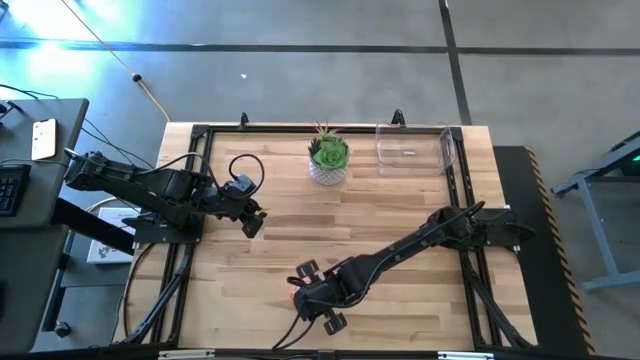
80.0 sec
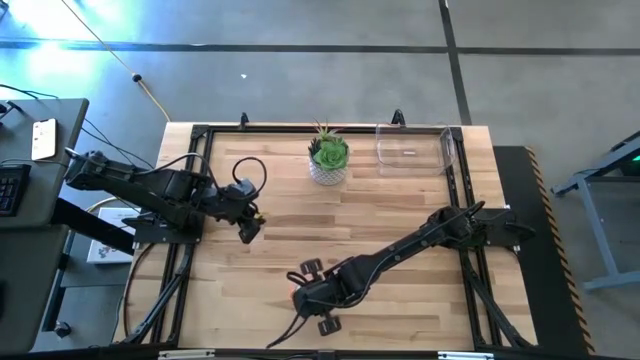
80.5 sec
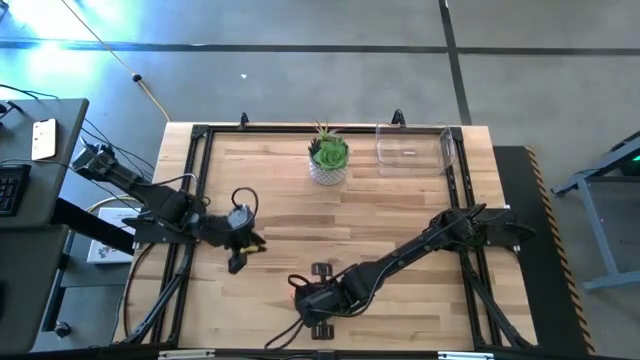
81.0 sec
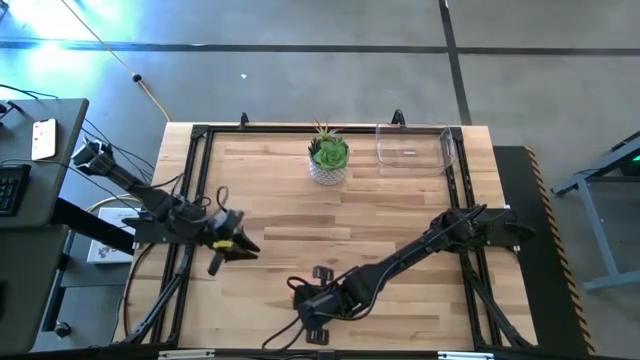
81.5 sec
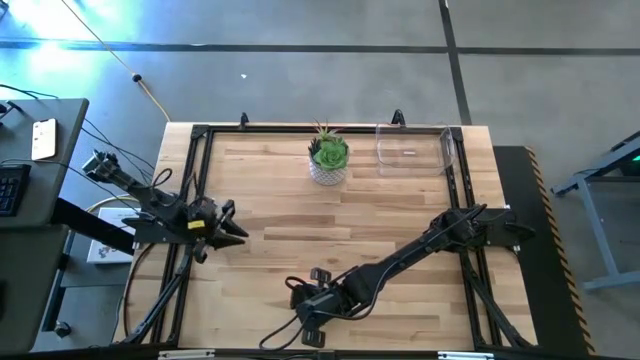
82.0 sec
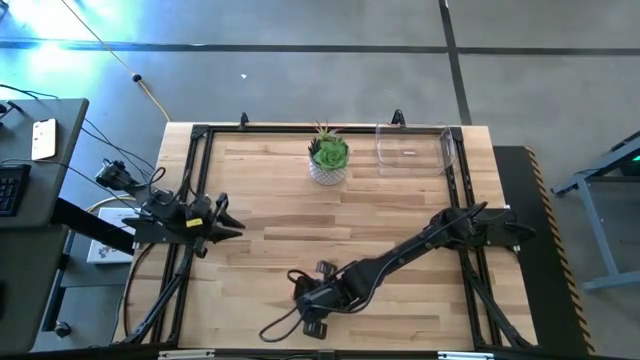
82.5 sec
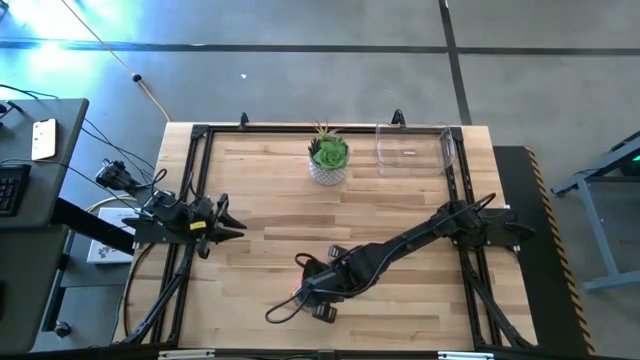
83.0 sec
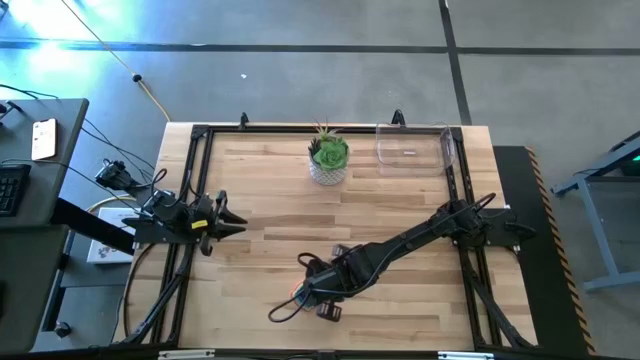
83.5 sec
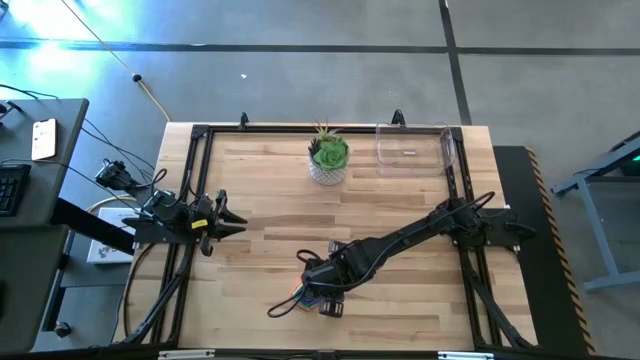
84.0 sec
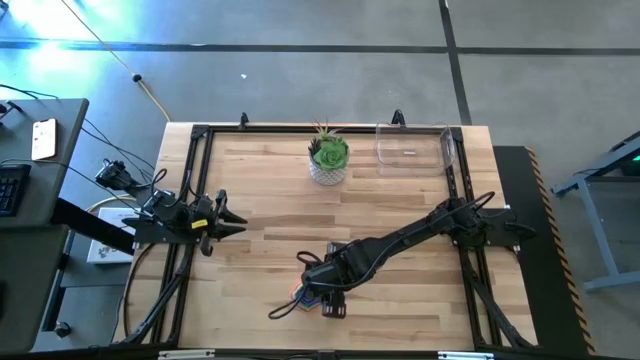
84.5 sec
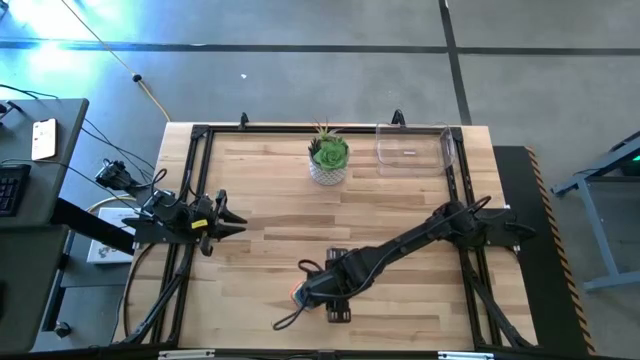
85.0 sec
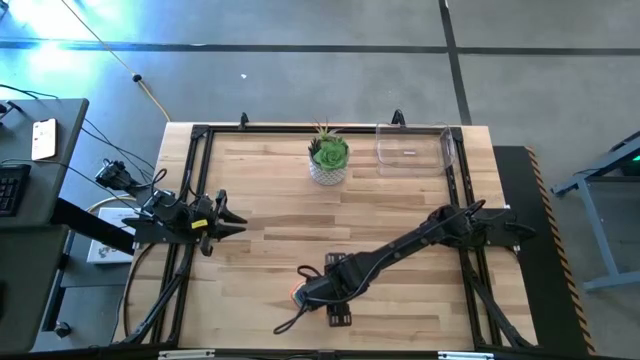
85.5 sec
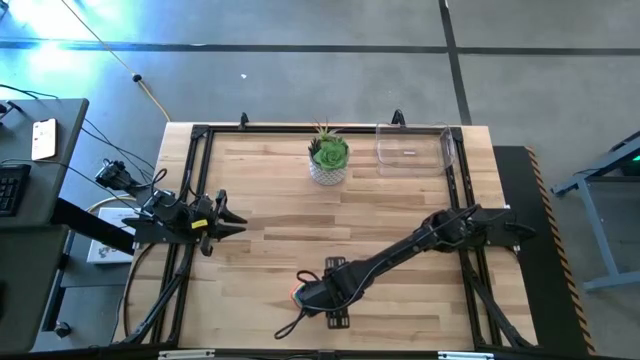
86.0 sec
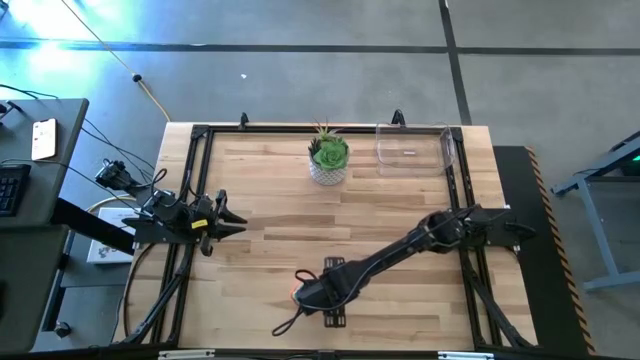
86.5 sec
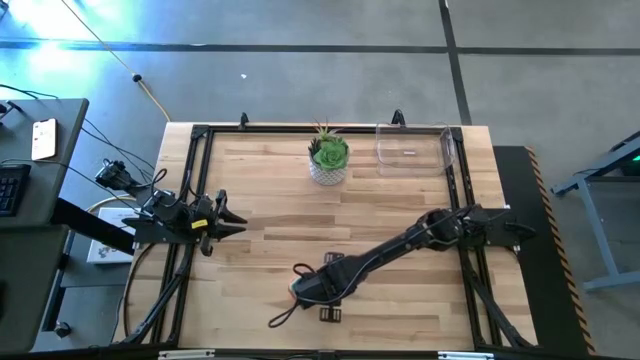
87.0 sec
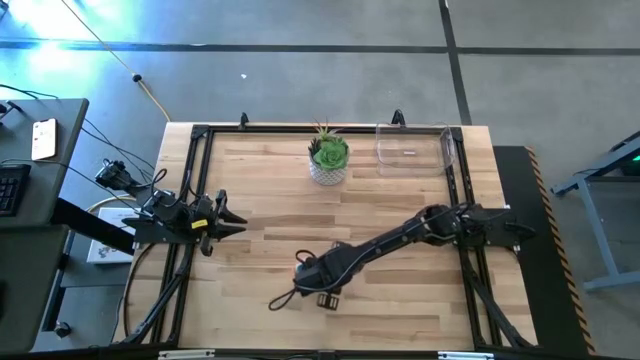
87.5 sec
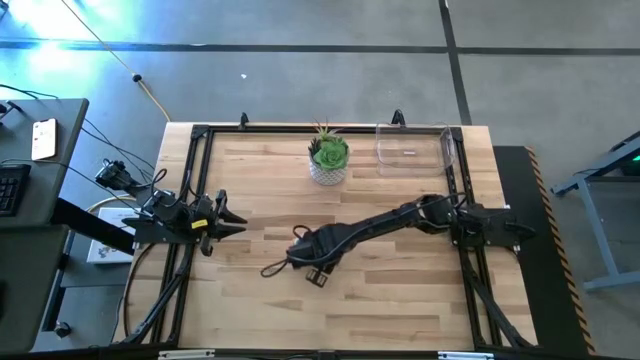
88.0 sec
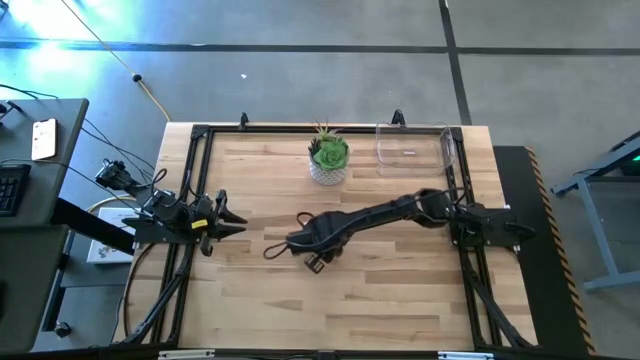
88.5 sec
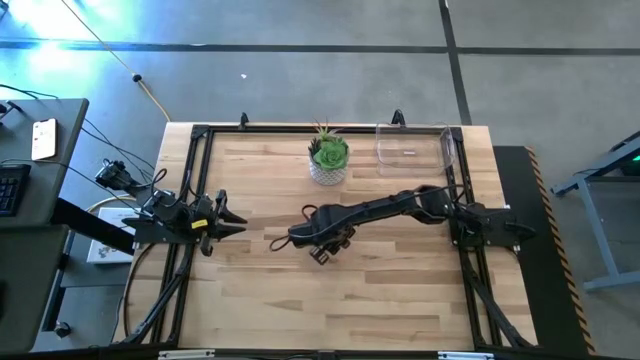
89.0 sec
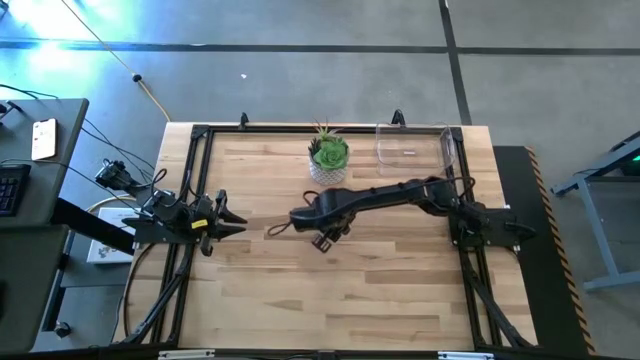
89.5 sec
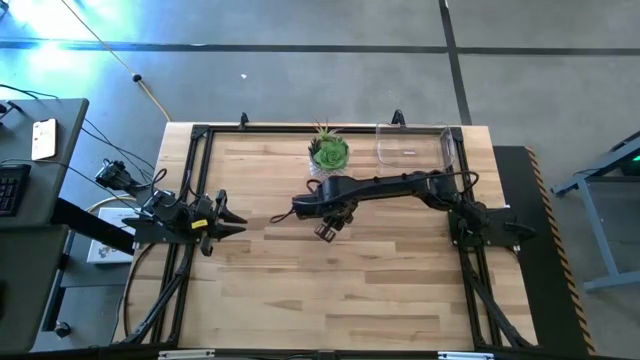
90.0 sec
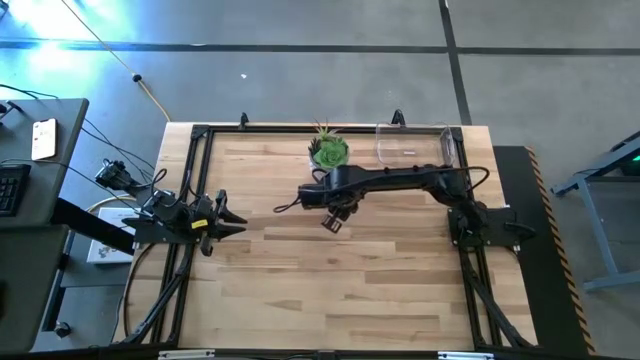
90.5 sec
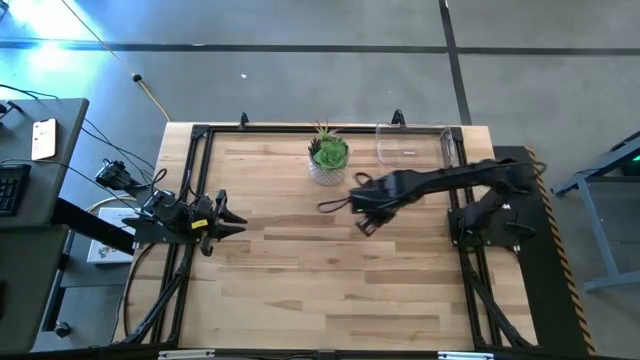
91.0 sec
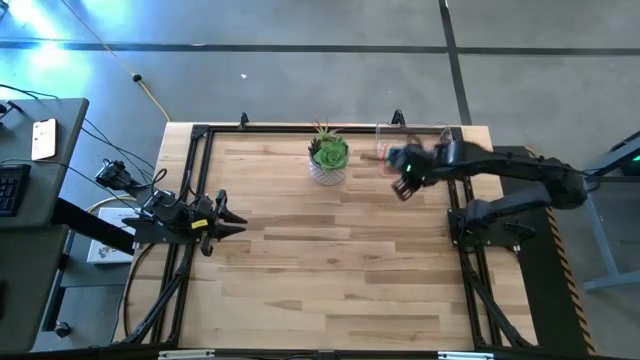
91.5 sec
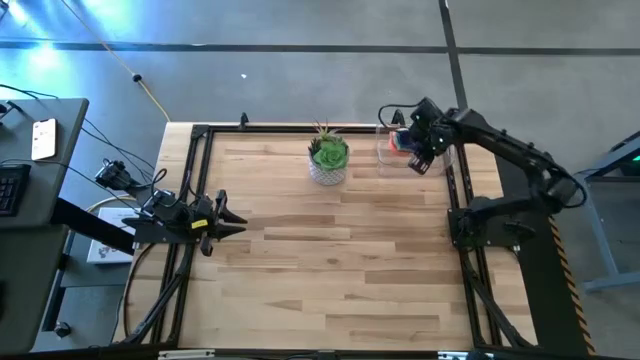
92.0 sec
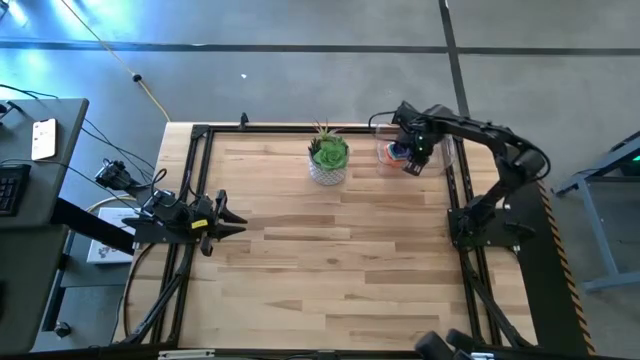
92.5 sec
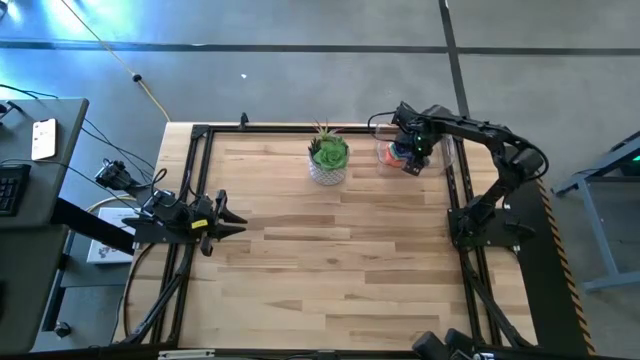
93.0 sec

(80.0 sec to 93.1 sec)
Task: Nest measuring cups in basket
Put the nested measuring cups into the transparent bin

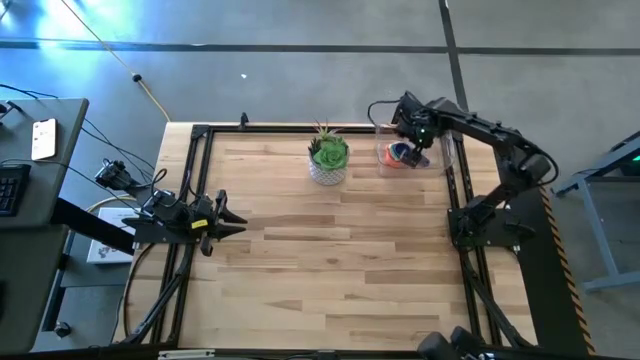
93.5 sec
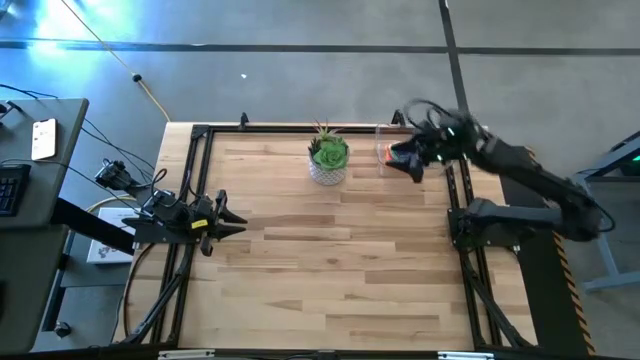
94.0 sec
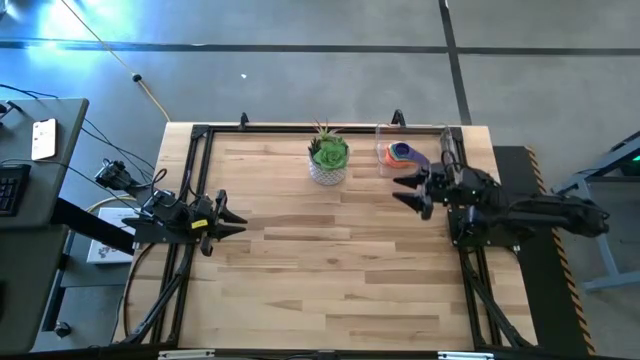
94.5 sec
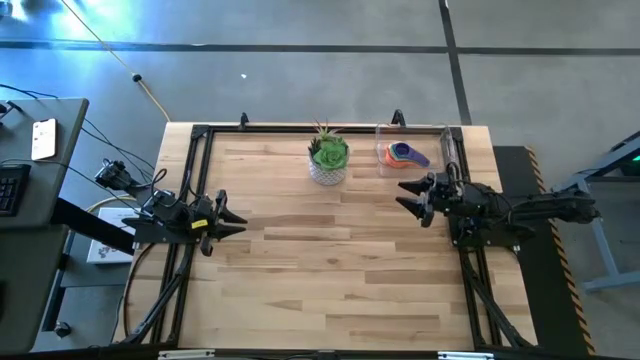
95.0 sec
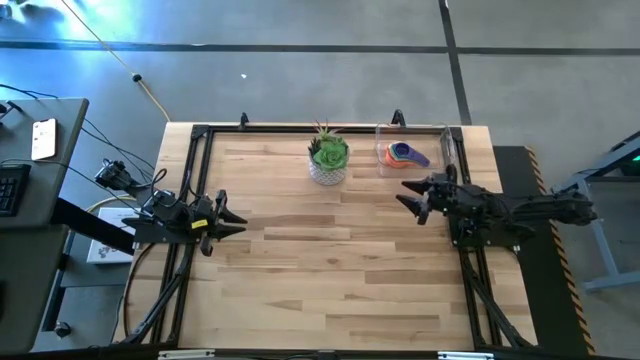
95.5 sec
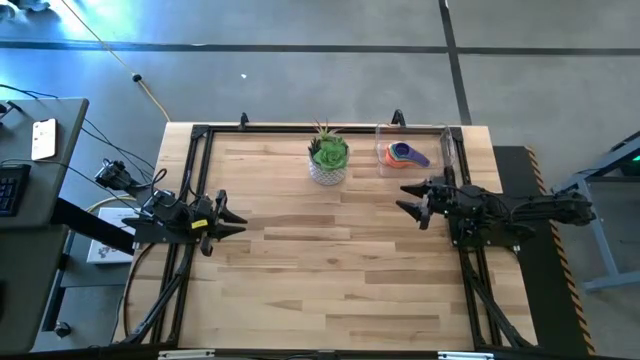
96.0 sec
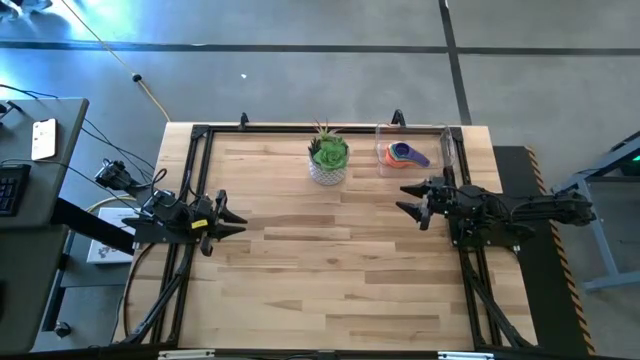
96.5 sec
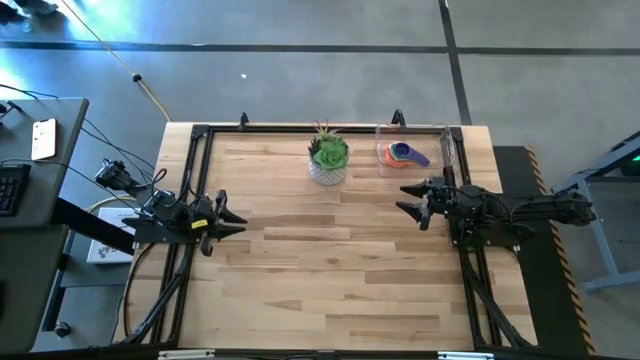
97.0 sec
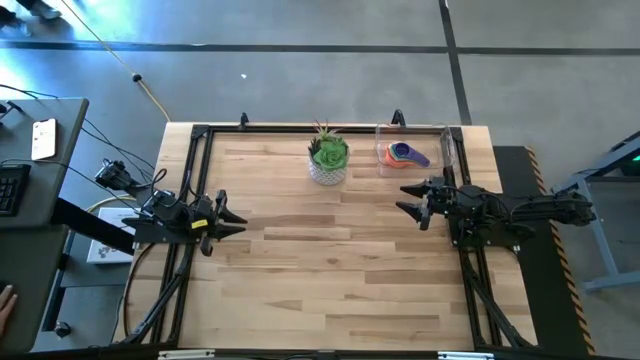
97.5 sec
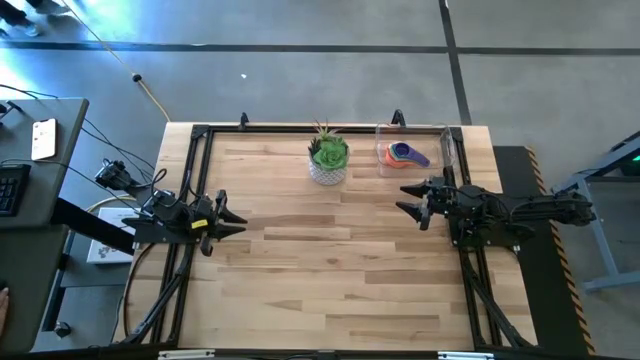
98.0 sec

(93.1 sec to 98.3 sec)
Return to Home Position

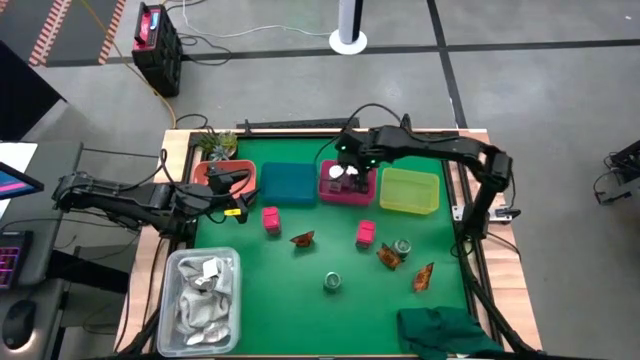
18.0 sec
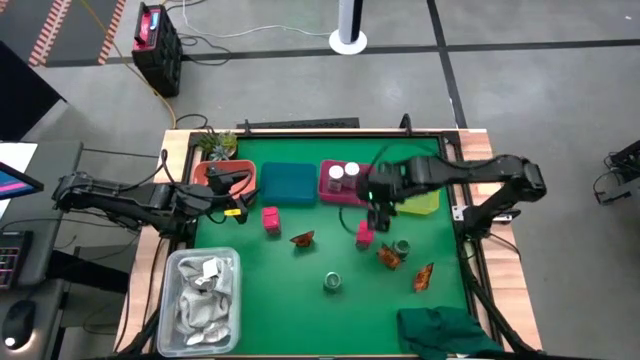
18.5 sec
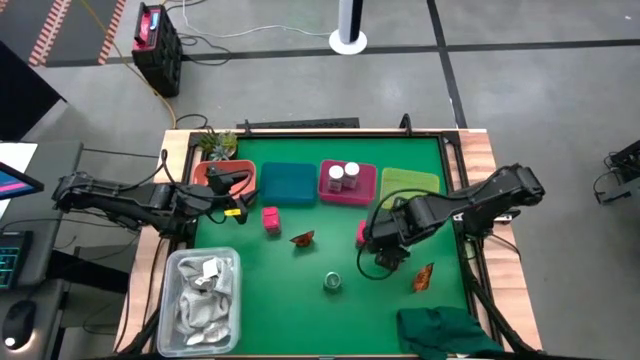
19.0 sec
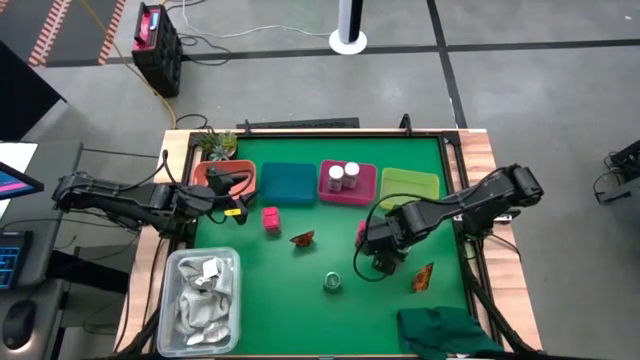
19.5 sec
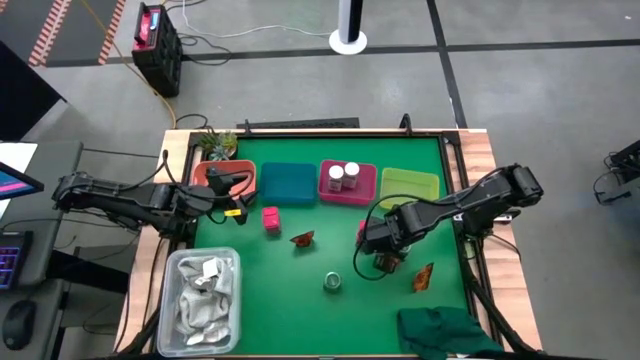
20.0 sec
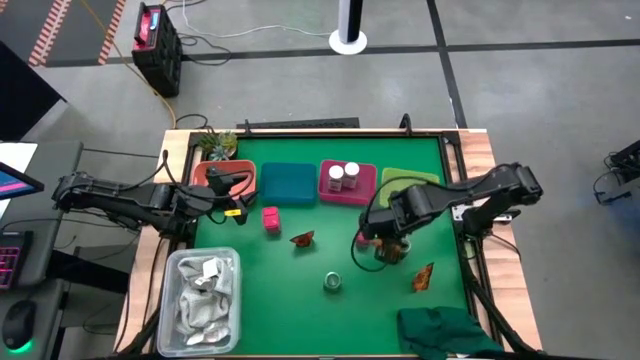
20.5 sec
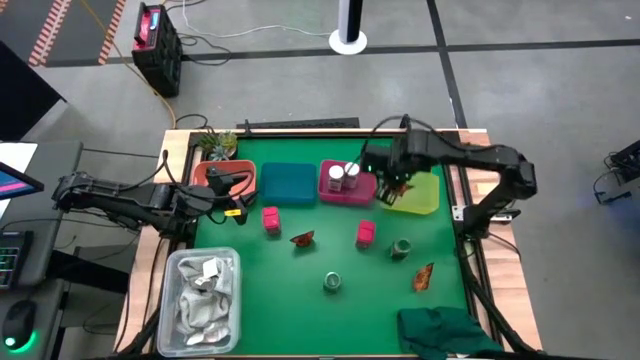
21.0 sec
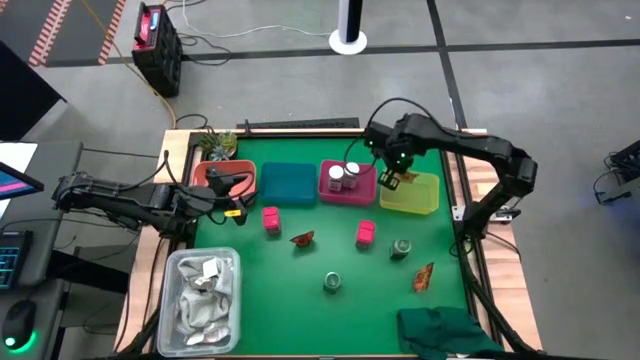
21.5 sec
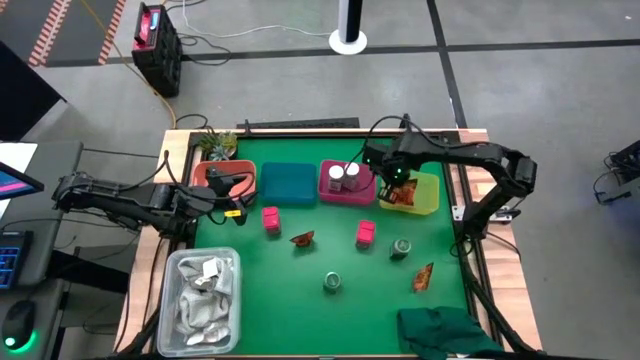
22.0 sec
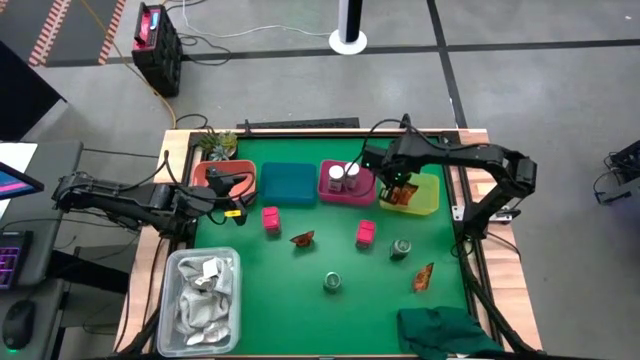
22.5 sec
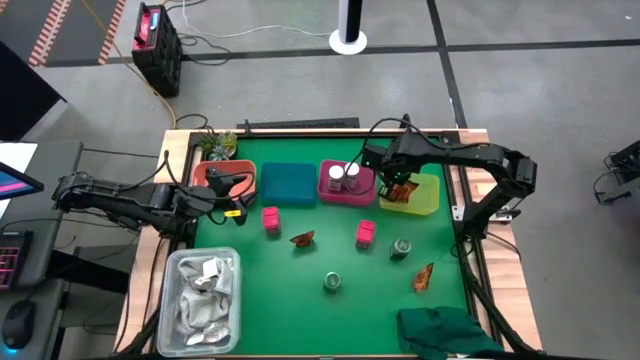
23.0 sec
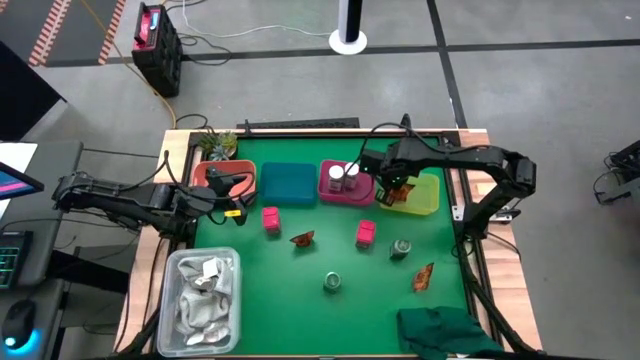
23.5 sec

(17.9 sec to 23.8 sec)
Task: Sort spices by type
Put the middle orange seasoning bag into the yellow bin
